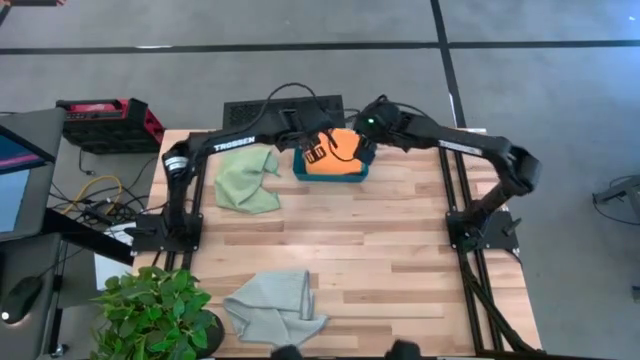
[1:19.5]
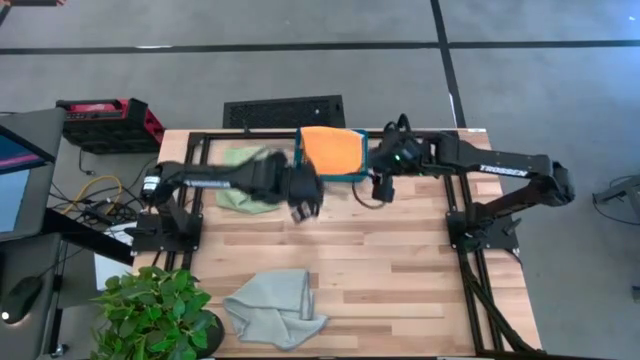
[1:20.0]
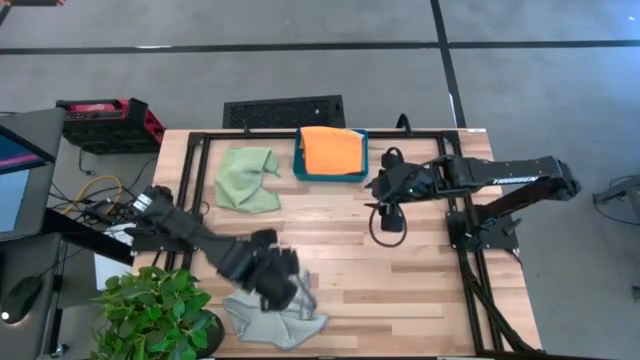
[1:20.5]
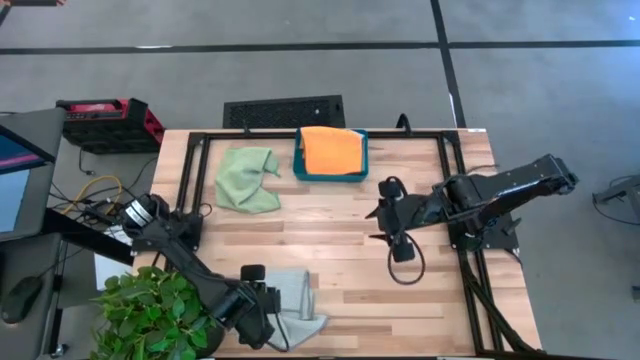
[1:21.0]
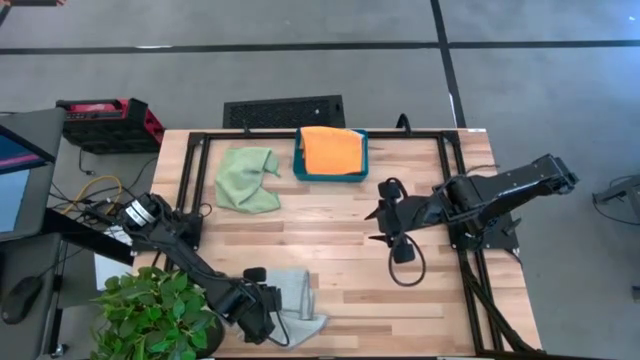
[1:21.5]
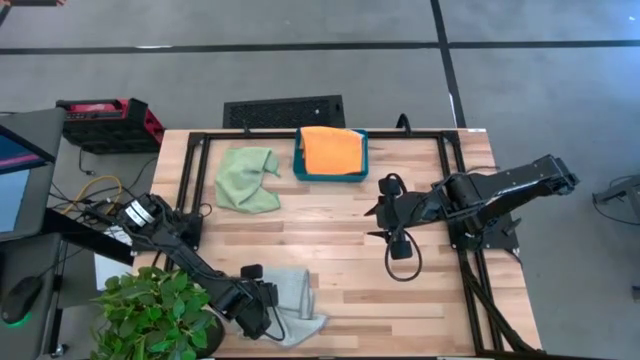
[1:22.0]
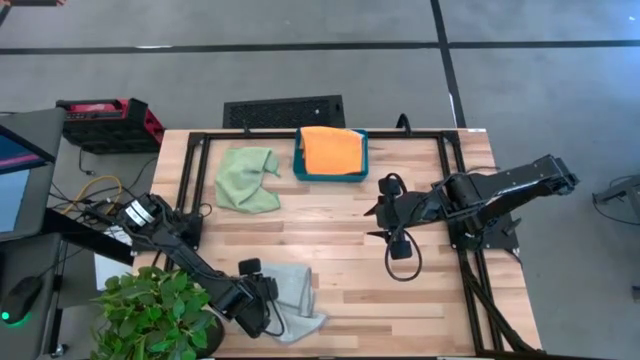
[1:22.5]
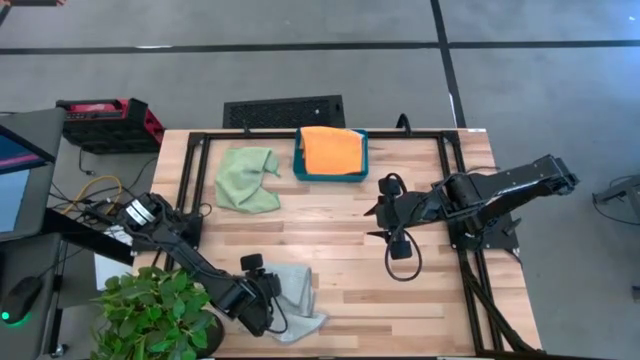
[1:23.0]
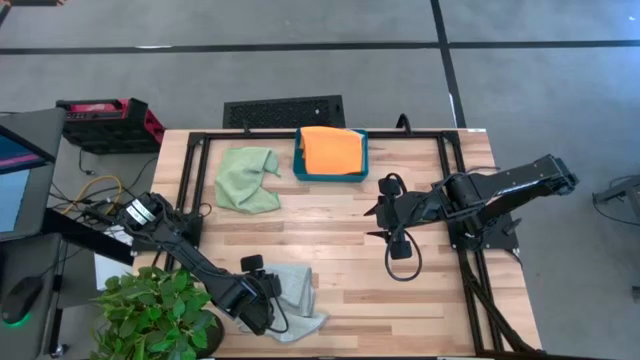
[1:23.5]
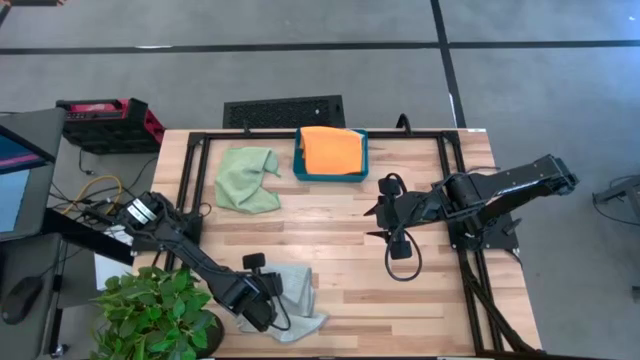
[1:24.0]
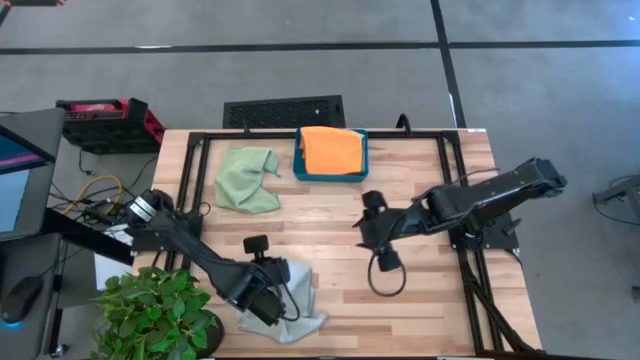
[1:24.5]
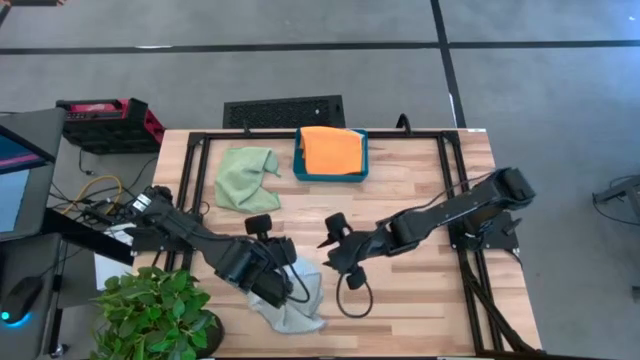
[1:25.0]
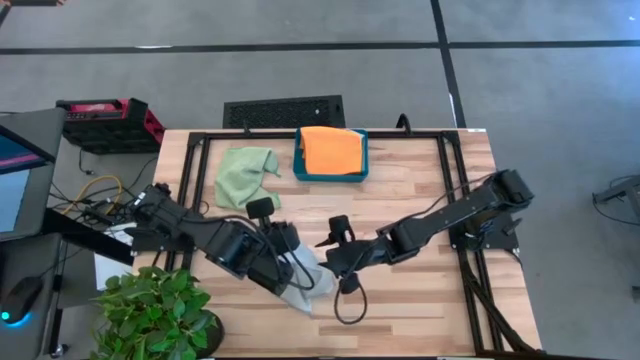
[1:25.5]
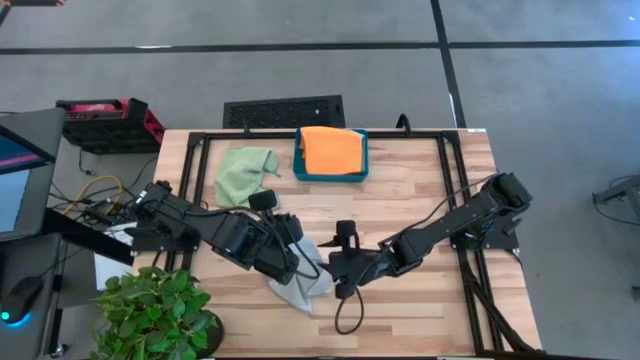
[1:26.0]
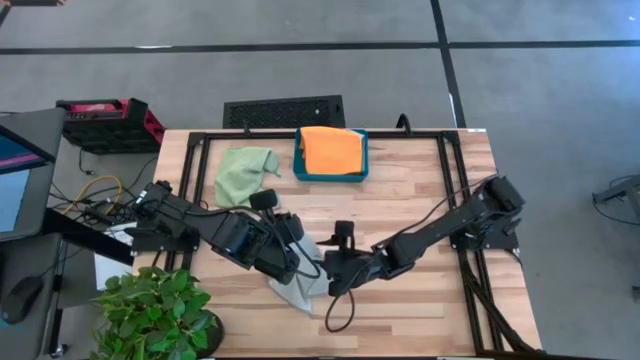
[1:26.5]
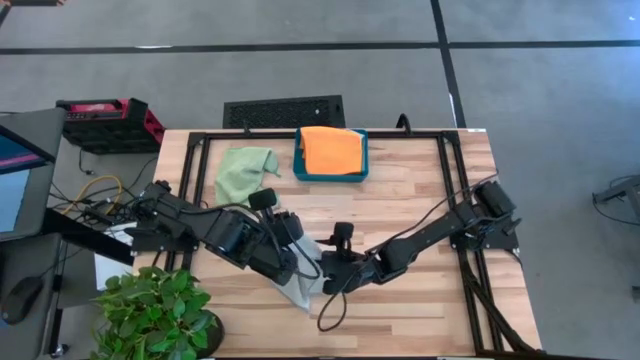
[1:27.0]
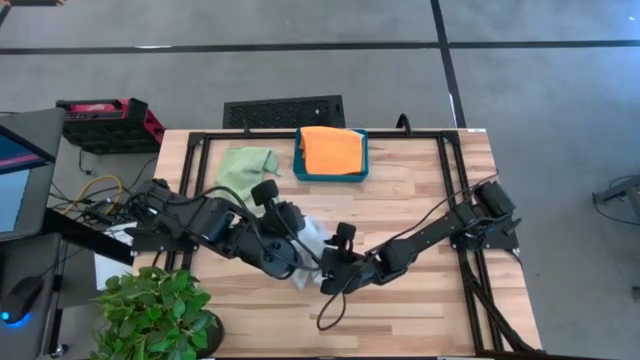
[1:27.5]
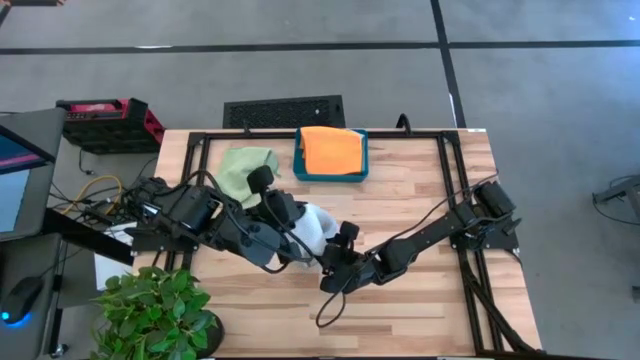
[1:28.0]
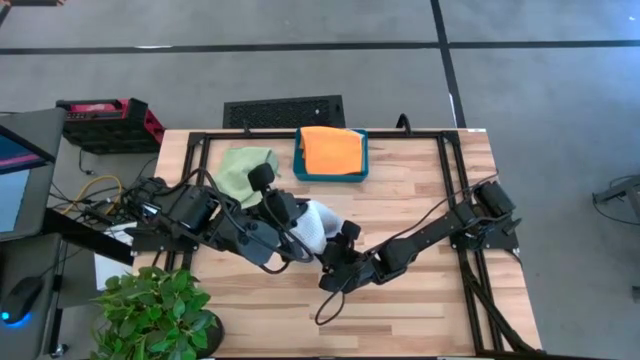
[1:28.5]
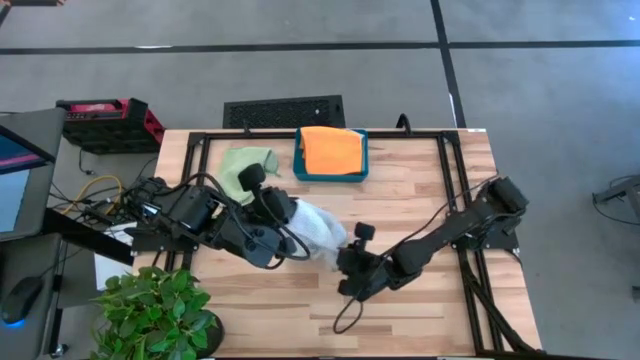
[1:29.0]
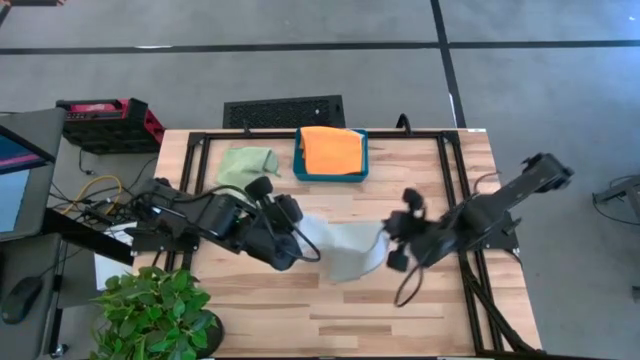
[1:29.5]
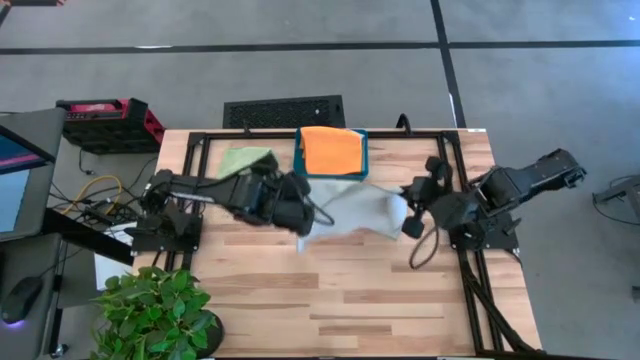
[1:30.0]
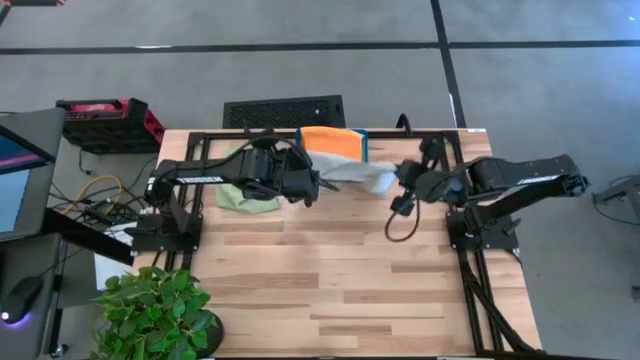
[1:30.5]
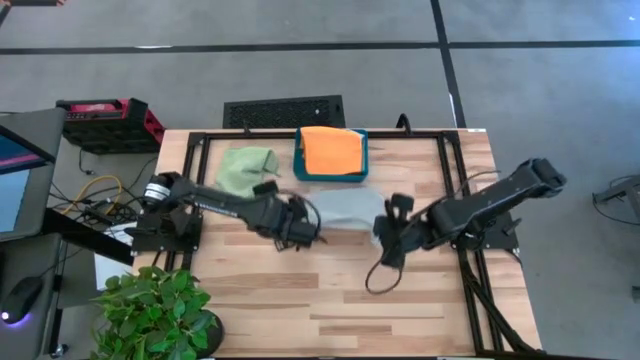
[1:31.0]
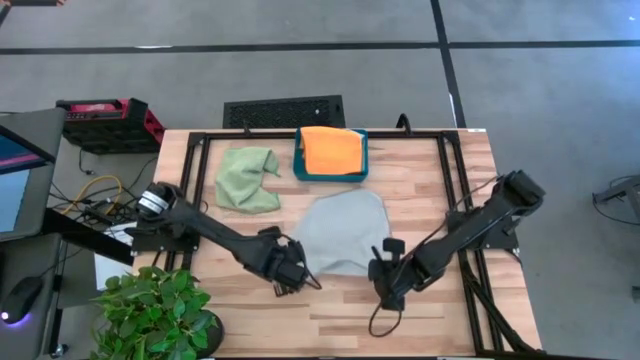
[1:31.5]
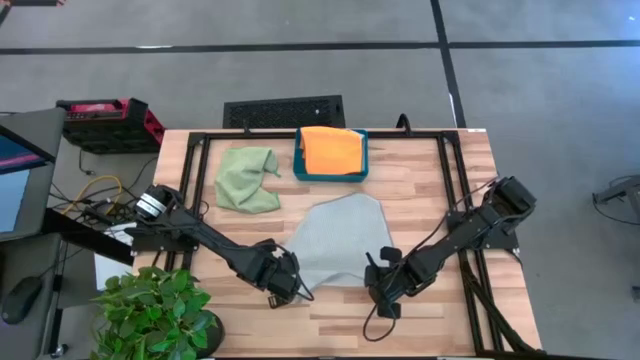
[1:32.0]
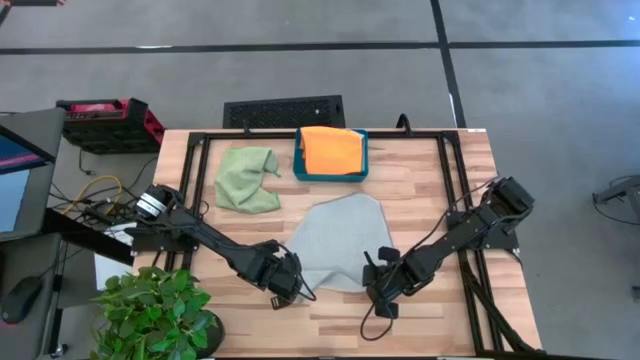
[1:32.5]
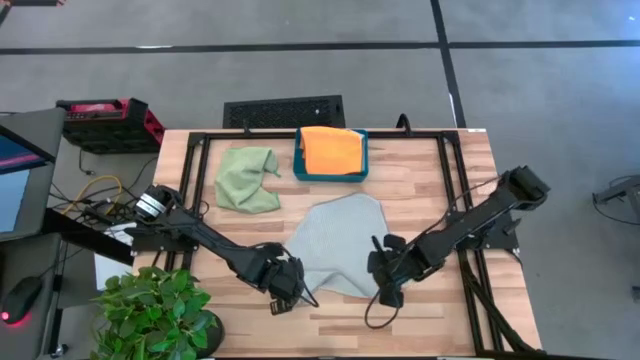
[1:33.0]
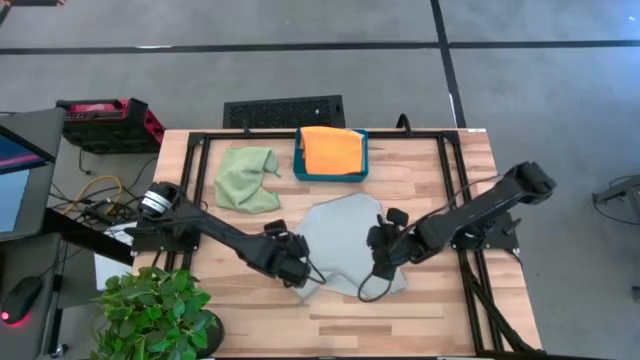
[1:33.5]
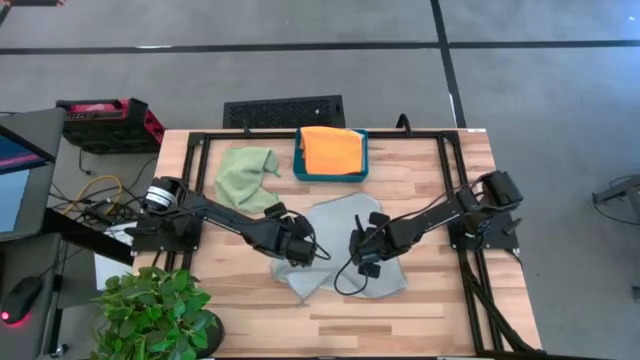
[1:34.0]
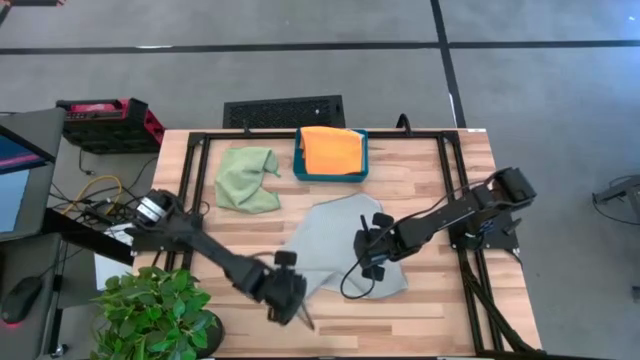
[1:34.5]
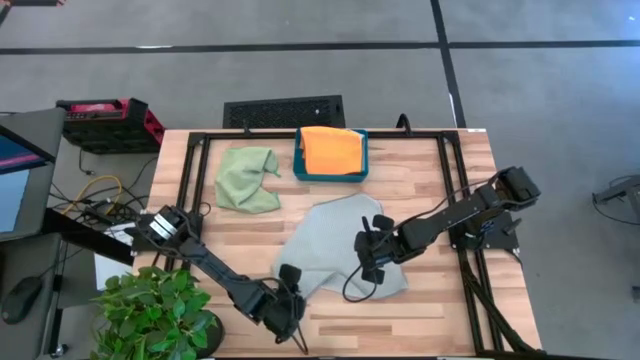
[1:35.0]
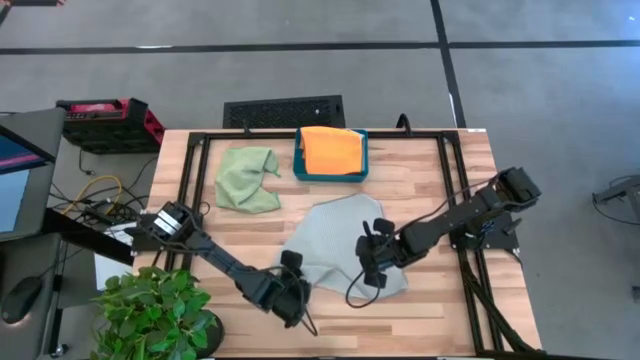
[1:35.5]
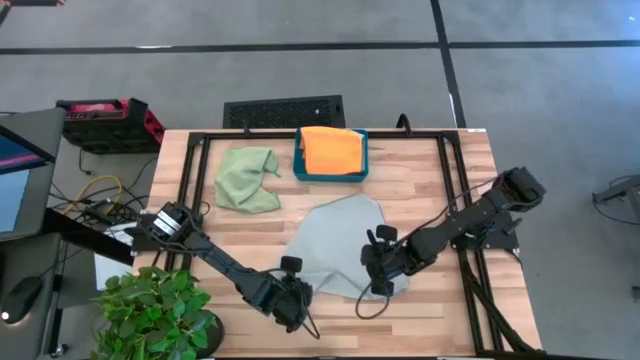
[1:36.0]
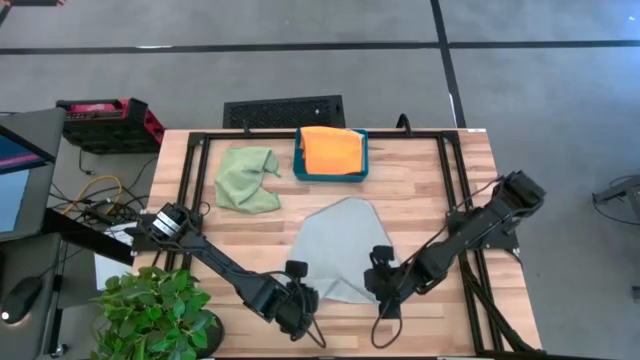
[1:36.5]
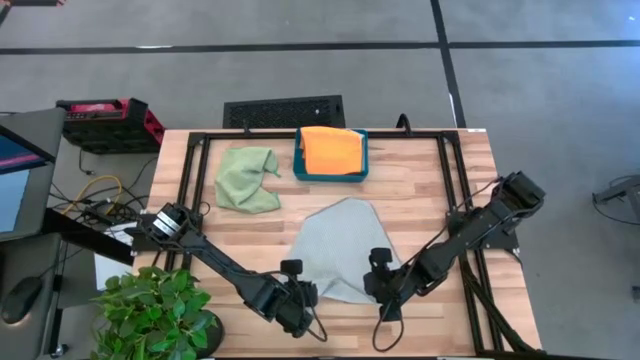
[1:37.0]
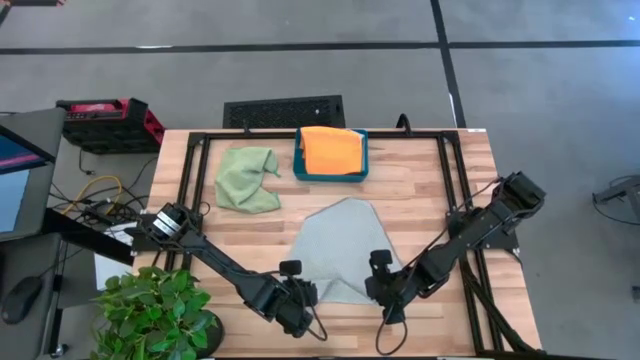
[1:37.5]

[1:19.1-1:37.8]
Task: Fold microfiber towels
Fold the gray towel

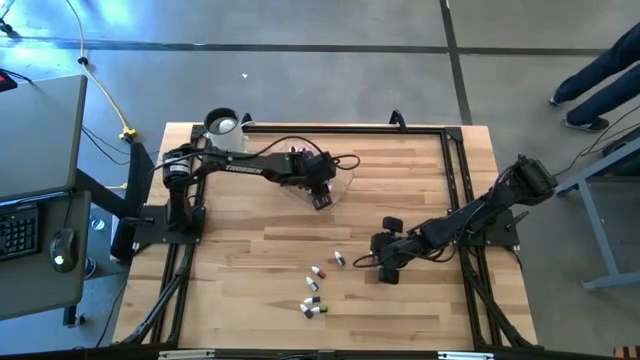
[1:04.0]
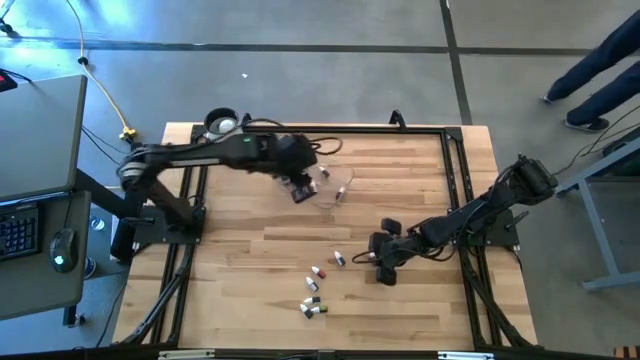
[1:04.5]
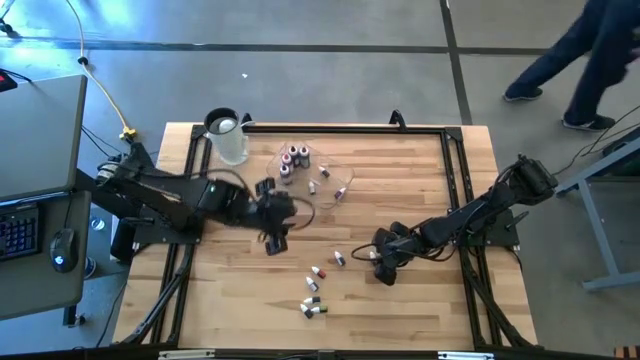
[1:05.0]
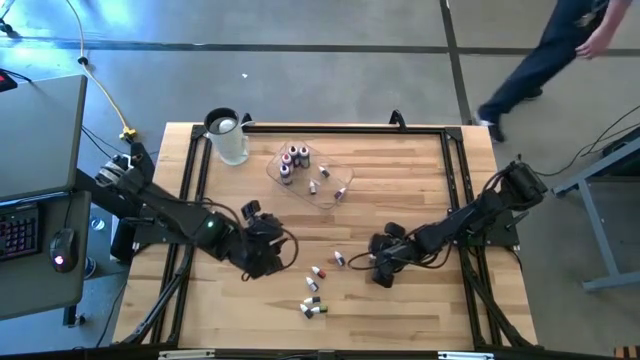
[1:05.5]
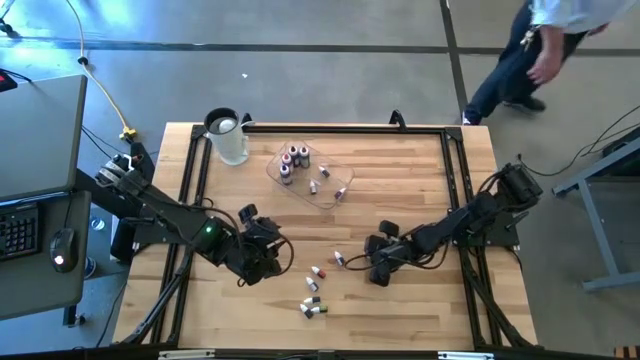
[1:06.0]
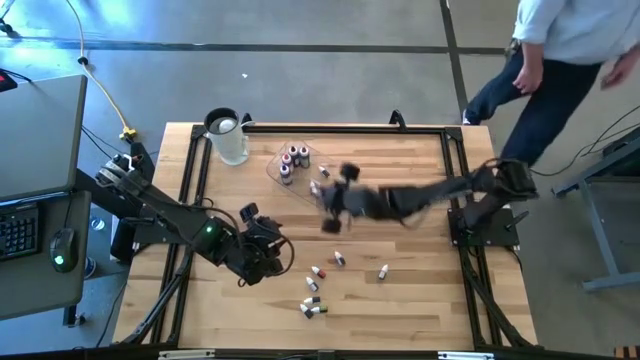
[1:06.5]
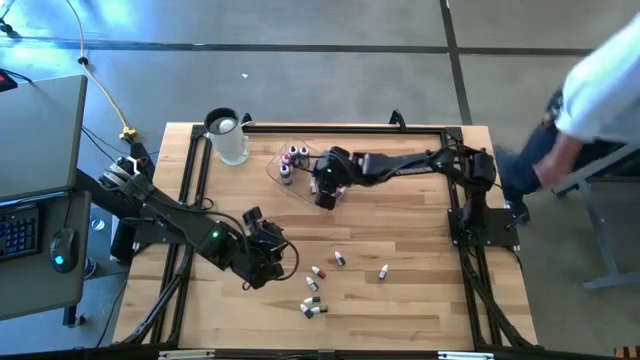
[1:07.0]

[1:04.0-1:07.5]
Task: Pick & Place food coloring
Put the small orange food coloring bottle into the bin

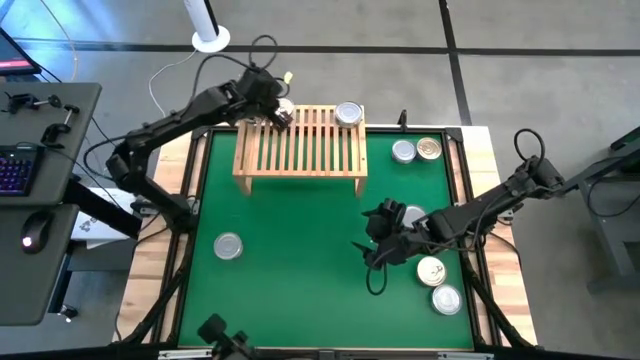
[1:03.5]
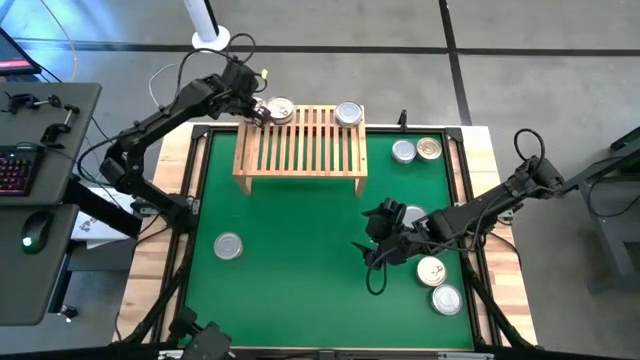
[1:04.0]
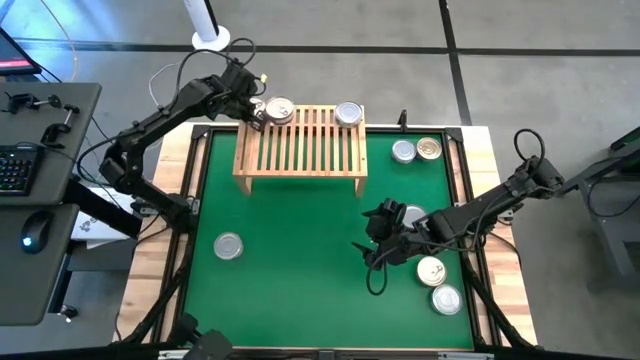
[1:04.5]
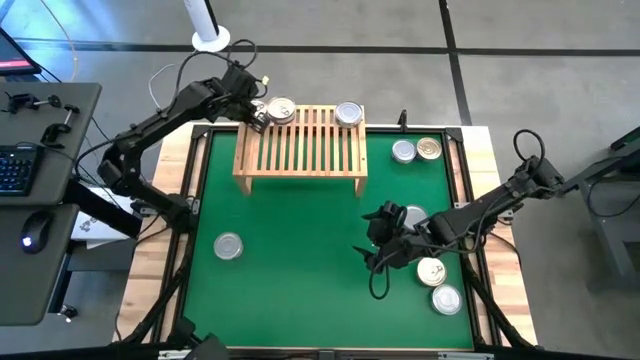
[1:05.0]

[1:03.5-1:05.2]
Task: Stack canned seafood by type on shelf
Adjust the left blue pink tuna can on the shelf
